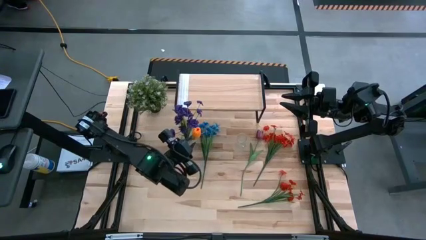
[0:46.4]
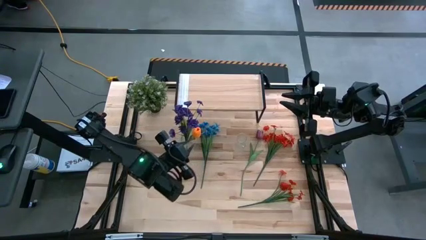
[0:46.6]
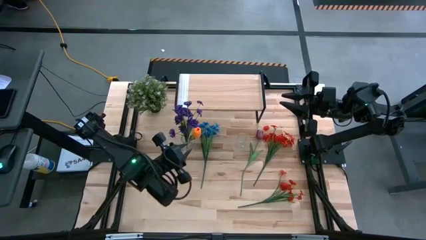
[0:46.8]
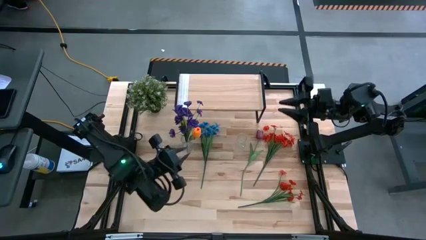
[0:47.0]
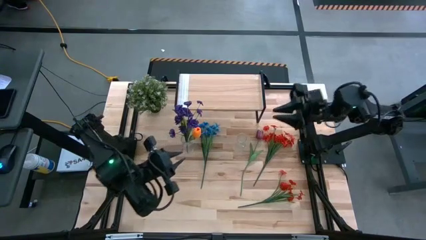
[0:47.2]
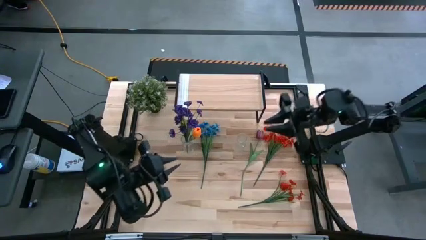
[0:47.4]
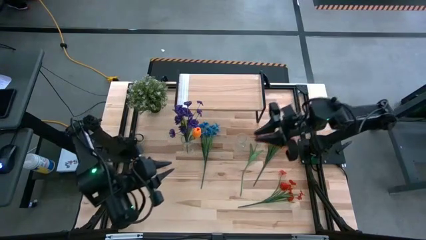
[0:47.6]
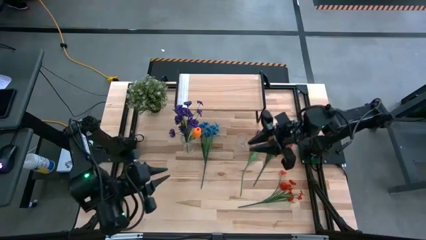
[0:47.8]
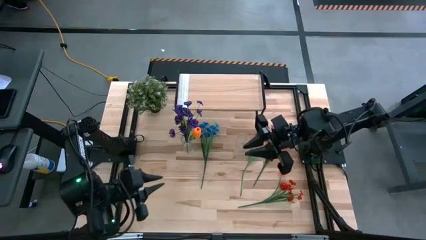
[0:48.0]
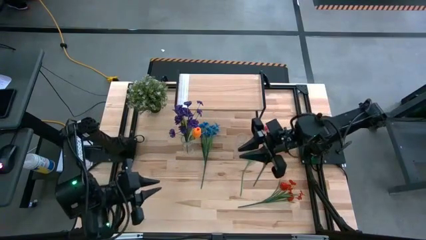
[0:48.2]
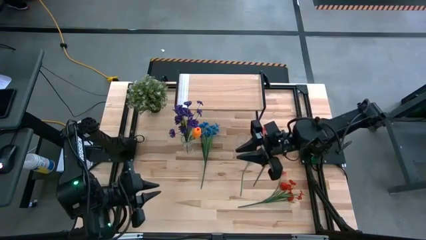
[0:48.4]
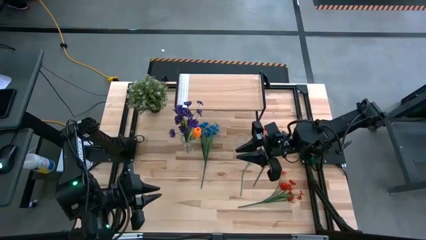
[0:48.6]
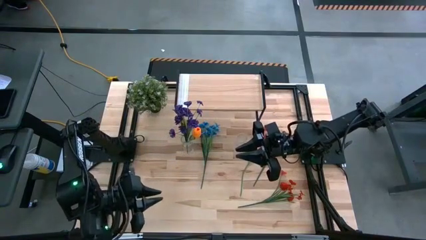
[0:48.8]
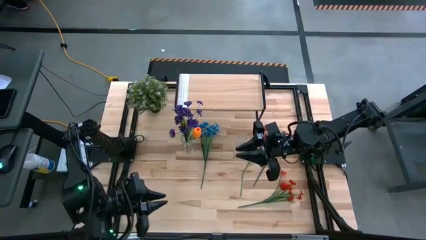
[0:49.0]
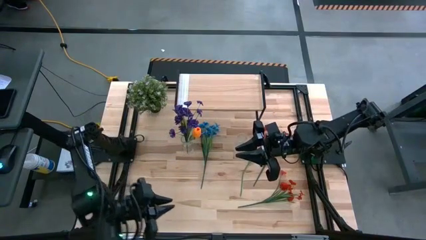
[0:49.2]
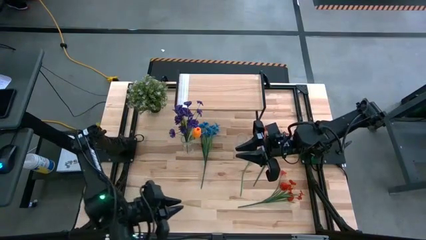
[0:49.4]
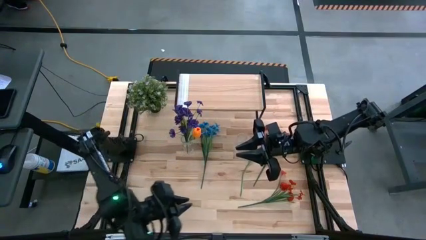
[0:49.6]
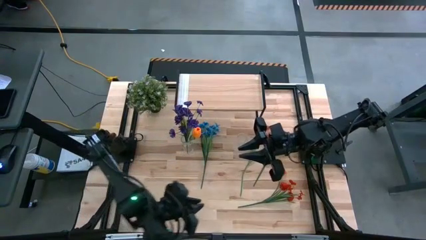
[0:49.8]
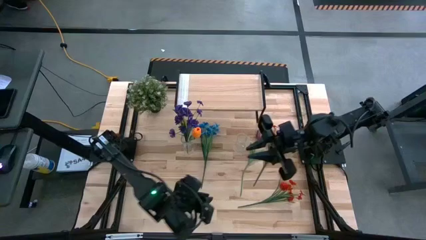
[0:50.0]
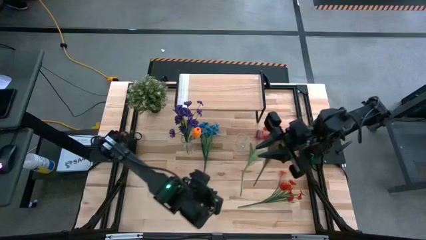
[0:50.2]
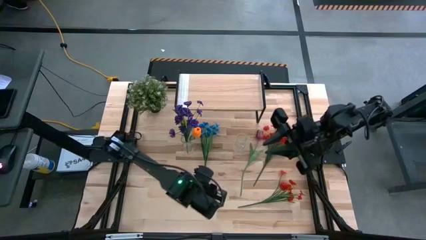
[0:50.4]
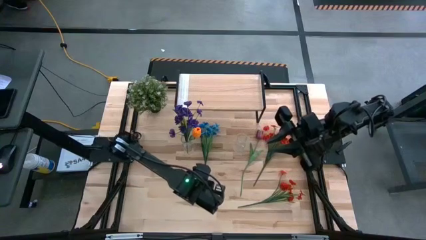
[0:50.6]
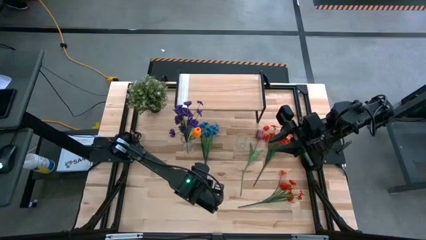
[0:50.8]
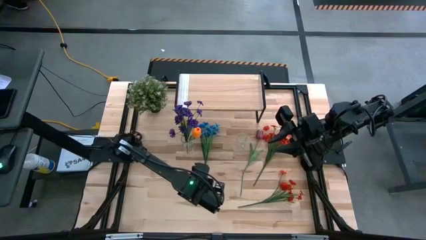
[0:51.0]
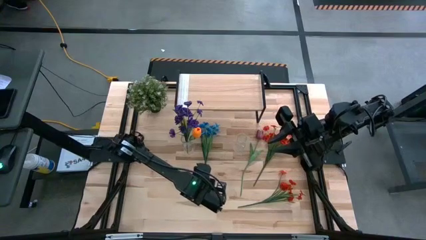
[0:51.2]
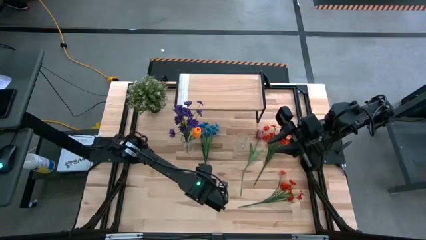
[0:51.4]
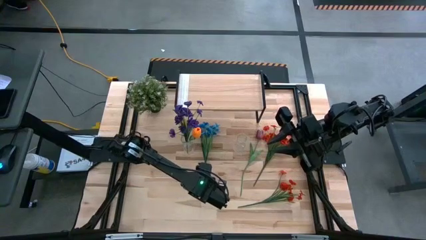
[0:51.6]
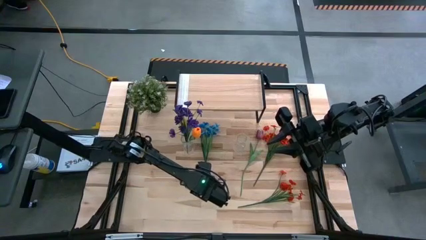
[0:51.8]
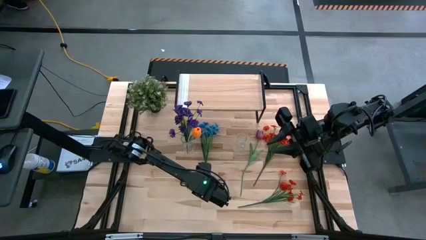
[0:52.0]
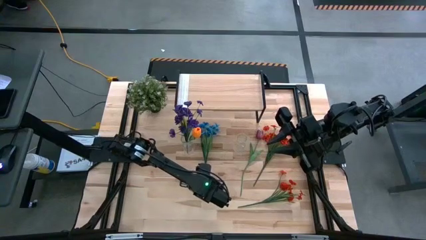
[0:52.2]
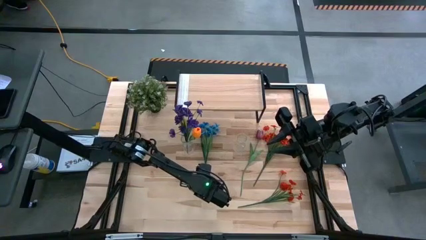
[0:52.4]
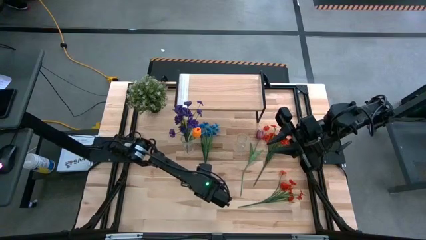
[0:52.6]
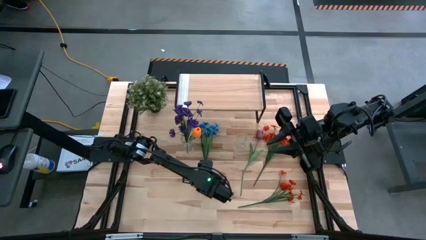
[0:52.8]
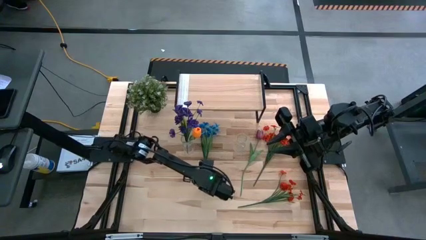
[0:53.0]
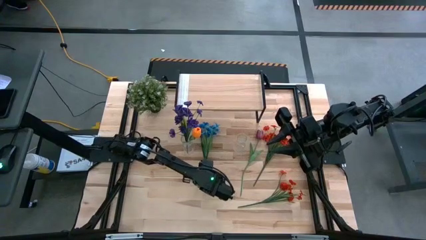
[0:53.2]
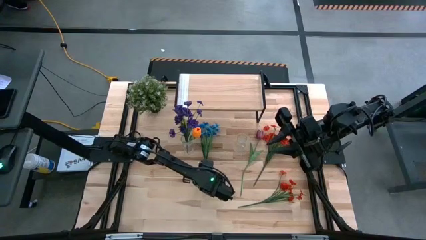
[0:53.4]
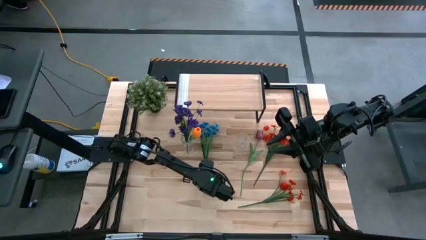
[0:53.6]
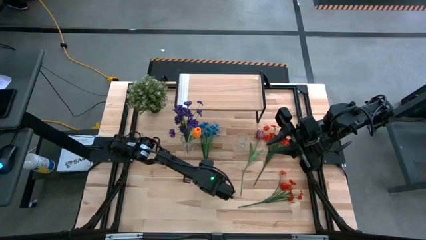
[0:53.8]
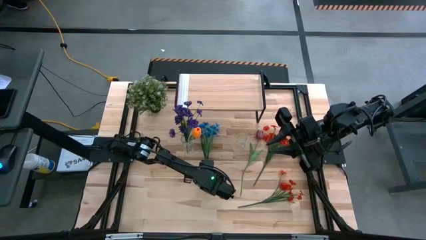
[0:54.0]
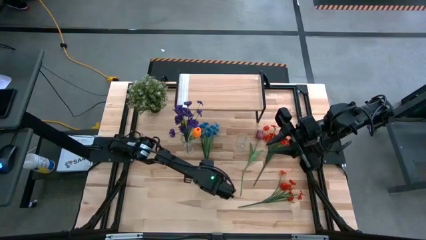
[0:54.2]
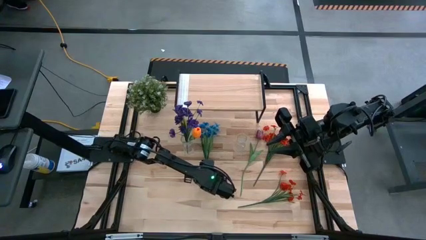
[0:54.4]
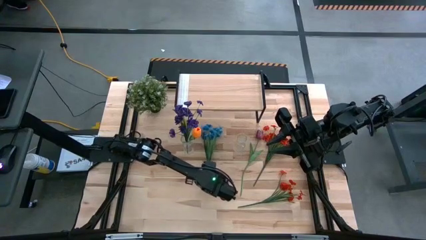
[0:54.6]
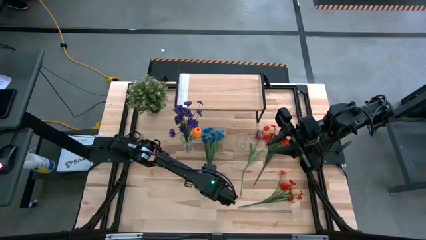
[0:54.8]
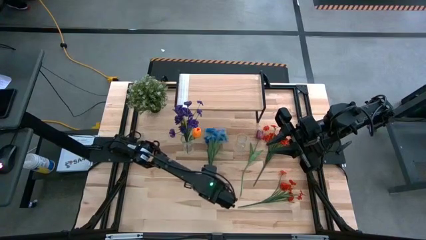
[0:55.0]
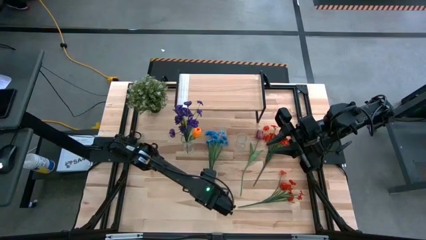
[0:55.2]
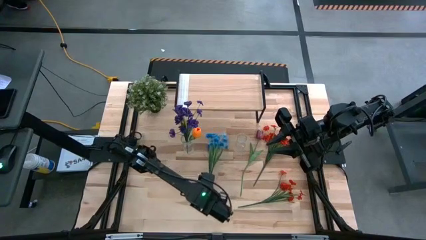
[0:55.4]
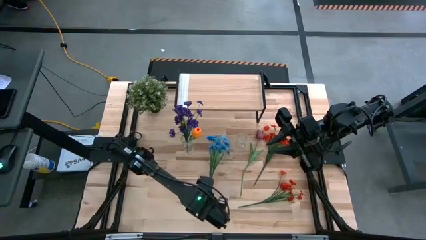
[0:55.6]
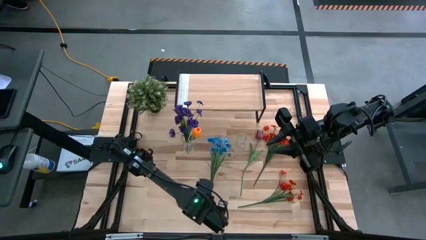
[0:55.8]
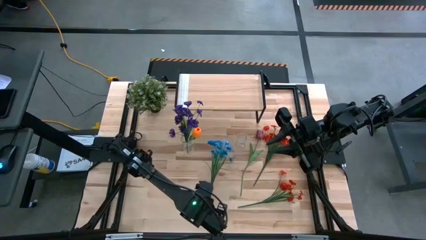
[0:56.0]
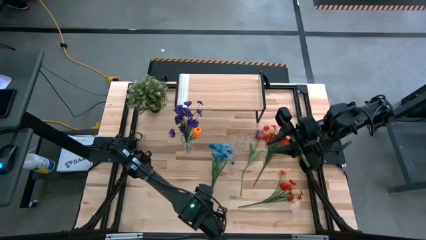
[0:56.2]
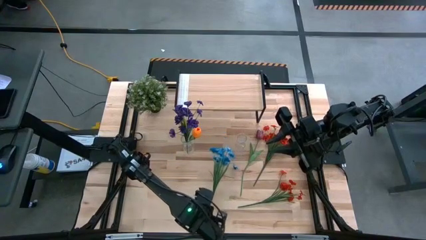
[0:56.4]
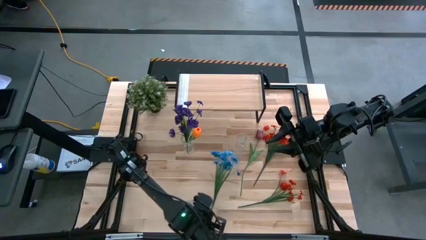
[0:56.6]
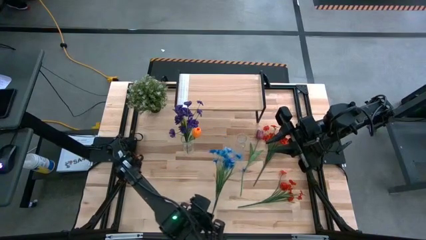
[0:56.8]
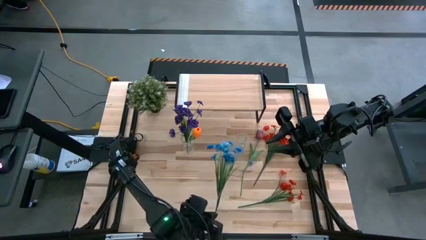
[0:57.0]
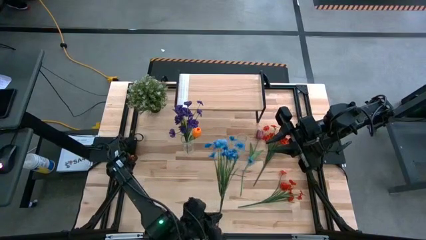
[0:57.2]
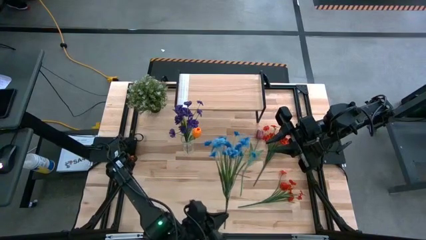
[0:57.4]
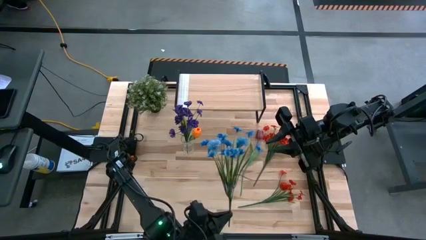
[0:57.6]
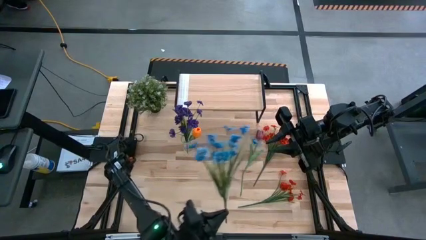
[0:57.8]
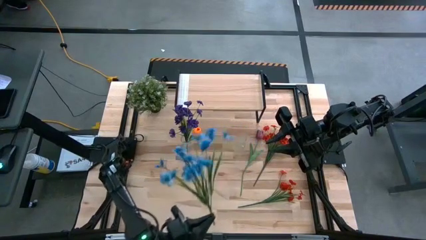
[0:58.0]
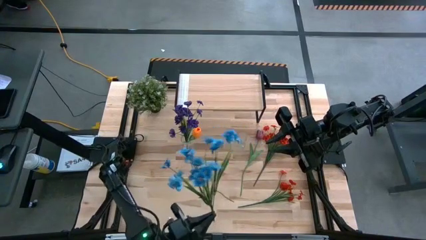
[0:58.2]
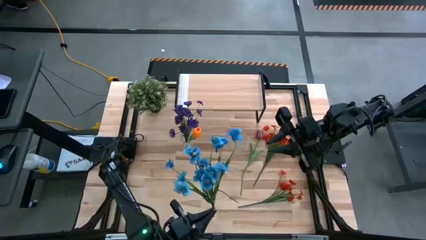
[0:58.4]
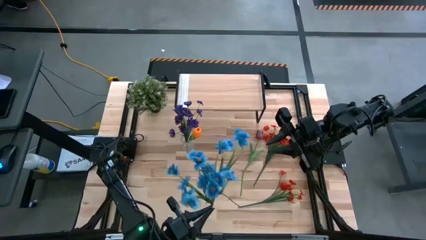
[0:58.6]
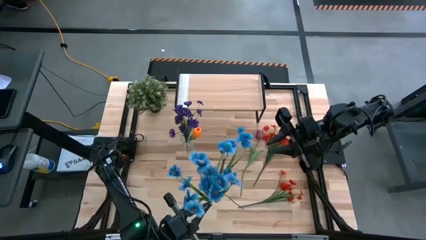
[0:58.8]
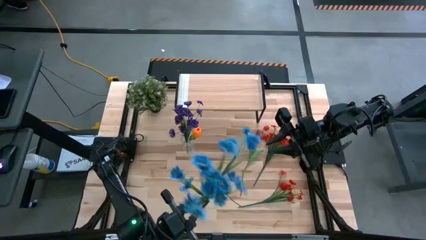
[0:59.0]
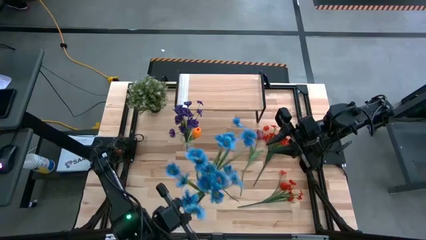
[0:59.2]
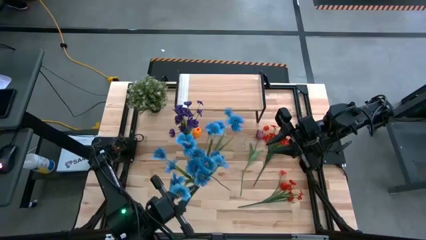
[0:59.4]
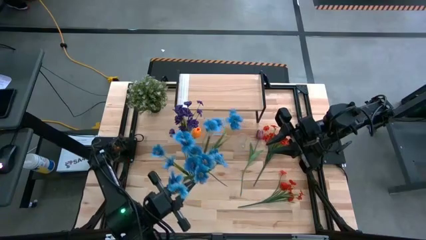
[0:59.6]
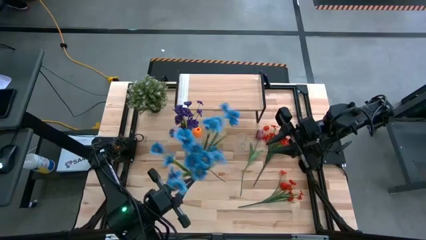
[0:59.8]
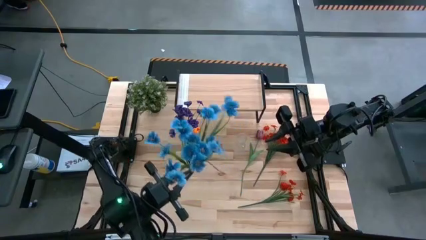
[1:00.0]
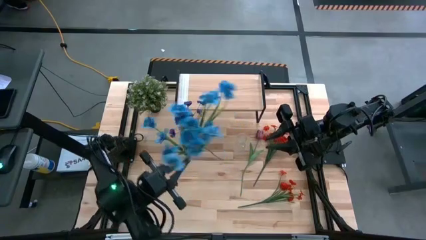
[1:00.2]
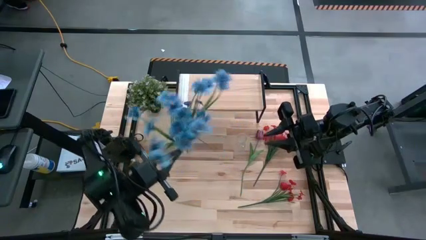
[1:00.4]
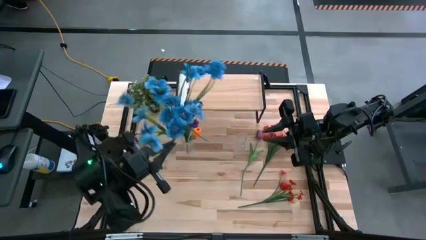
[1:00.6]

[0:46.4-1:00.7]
Task: Pick and place flowers into a vace then onto a shelf
Put the blue flowers into the left transparent vase
